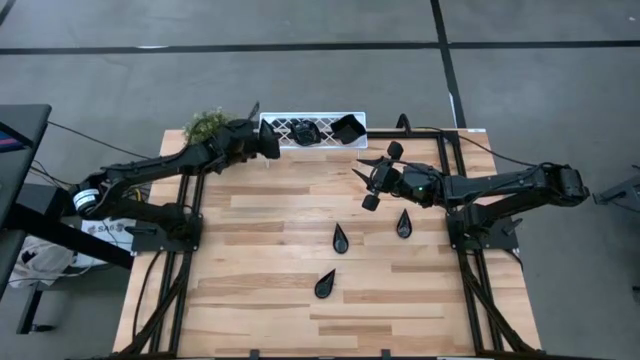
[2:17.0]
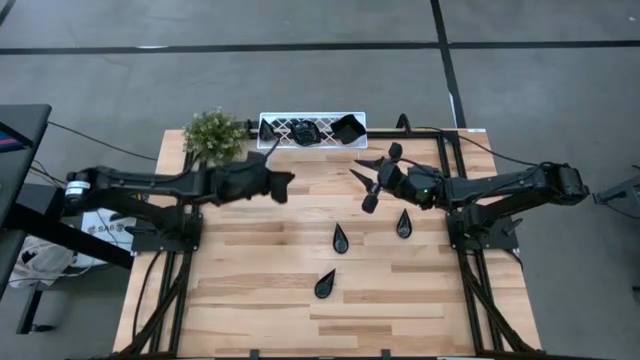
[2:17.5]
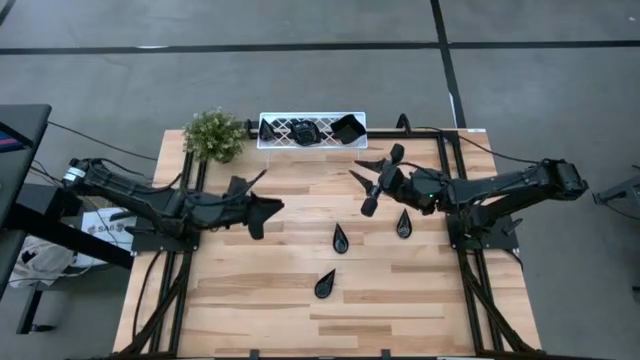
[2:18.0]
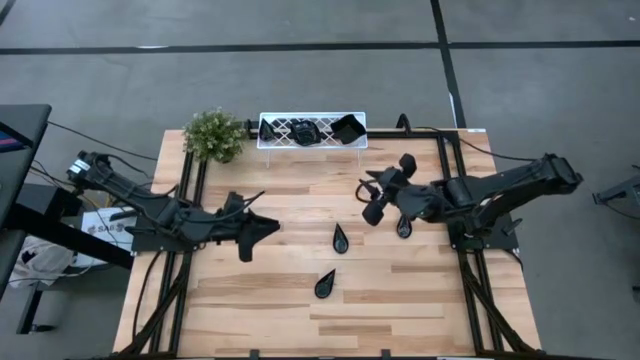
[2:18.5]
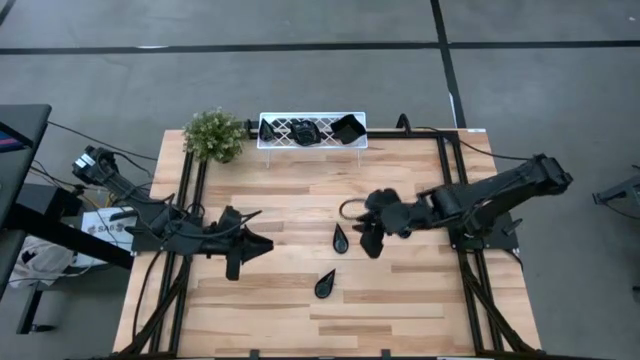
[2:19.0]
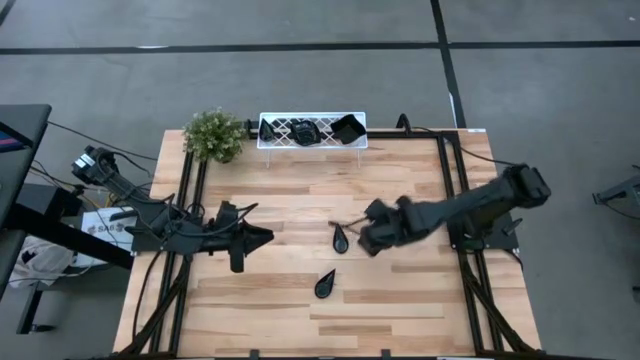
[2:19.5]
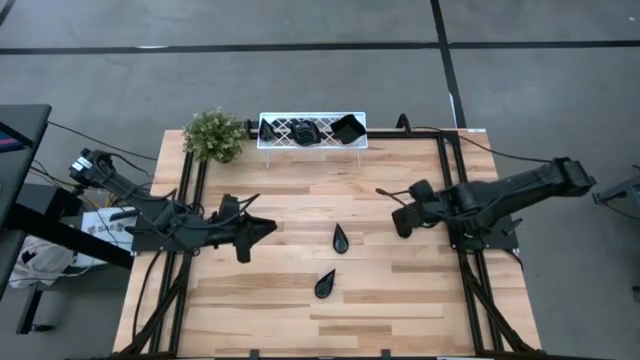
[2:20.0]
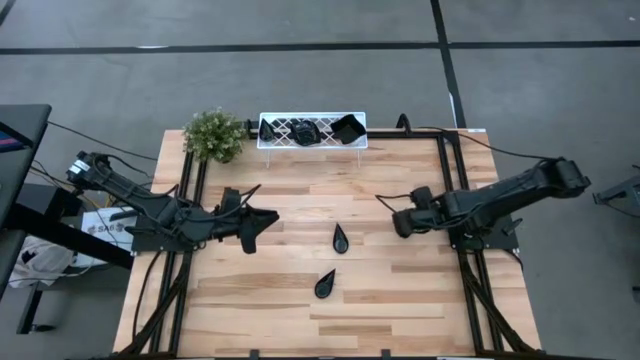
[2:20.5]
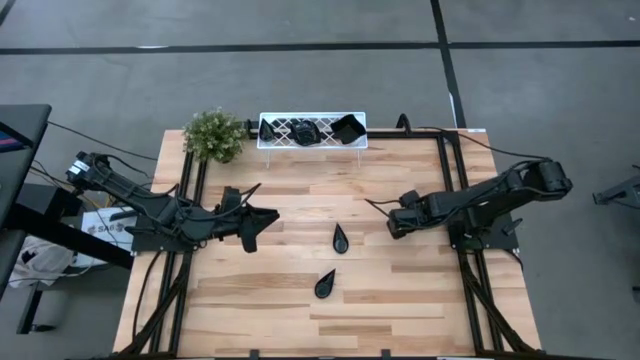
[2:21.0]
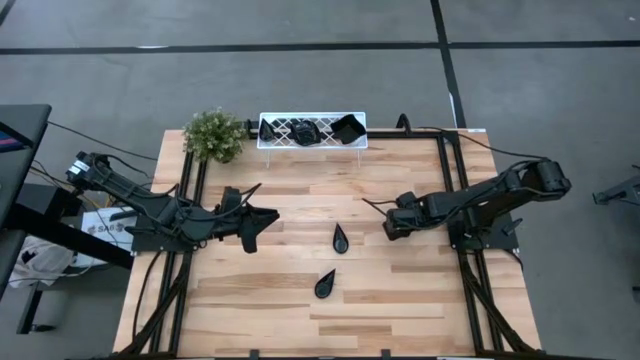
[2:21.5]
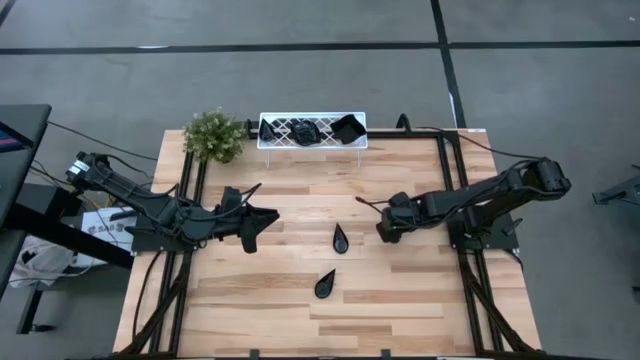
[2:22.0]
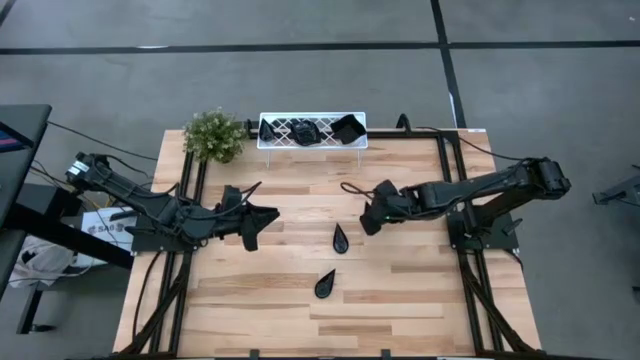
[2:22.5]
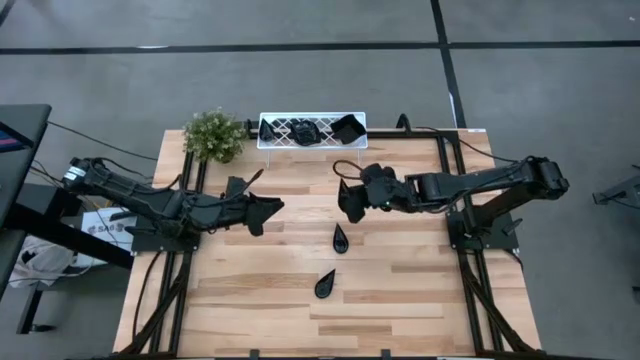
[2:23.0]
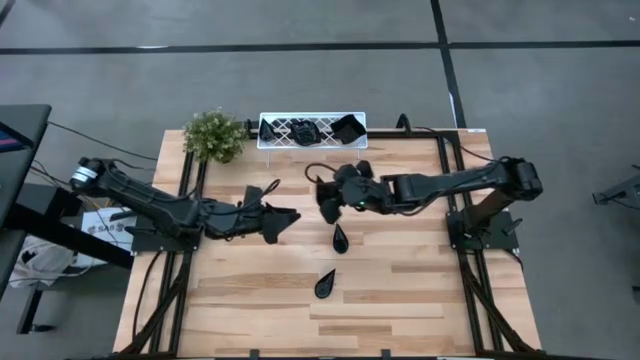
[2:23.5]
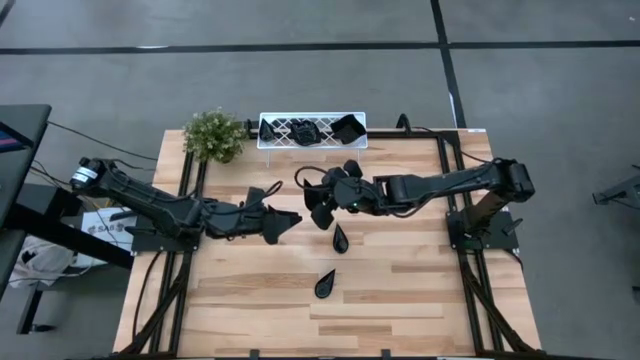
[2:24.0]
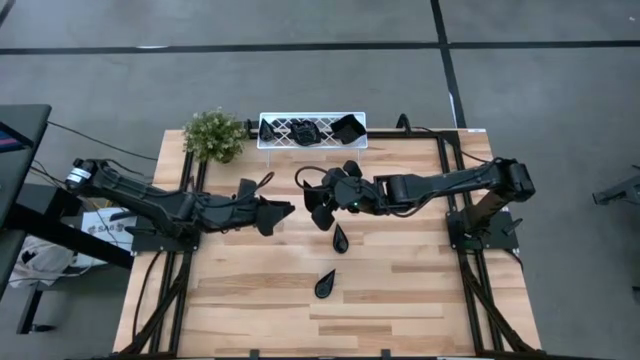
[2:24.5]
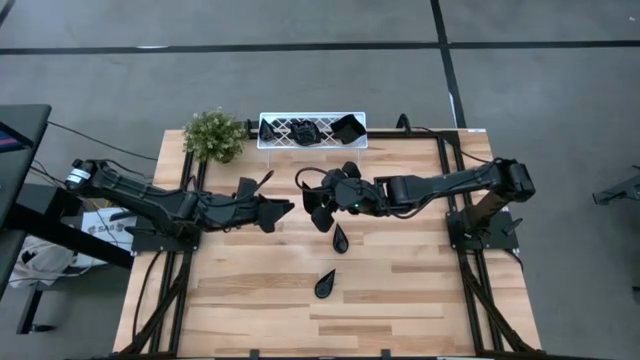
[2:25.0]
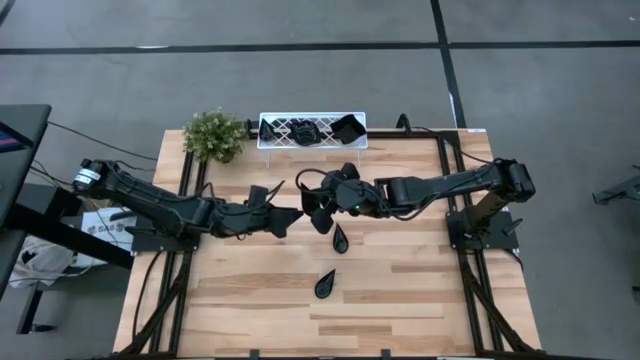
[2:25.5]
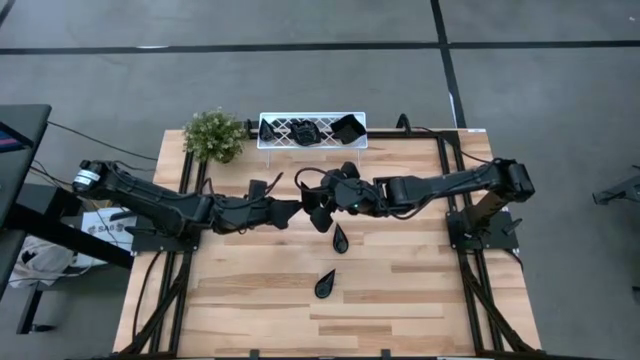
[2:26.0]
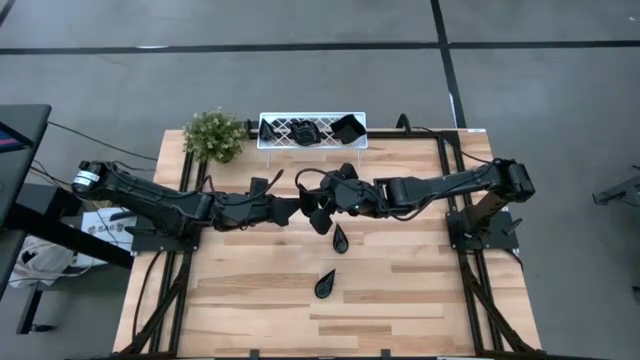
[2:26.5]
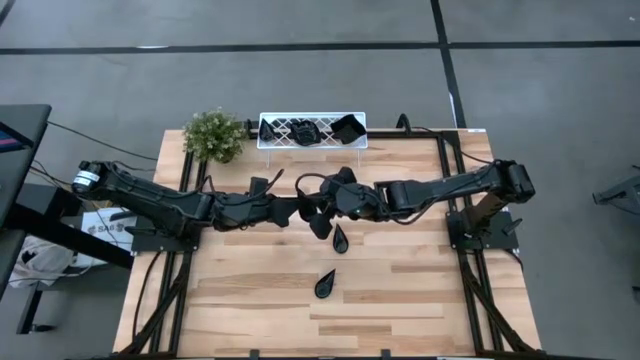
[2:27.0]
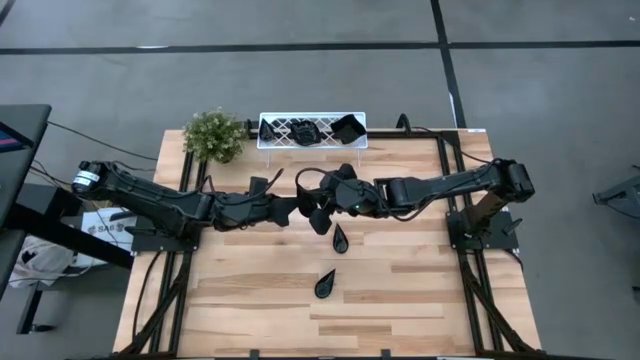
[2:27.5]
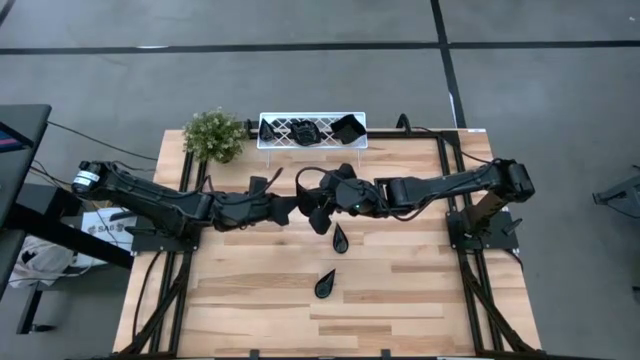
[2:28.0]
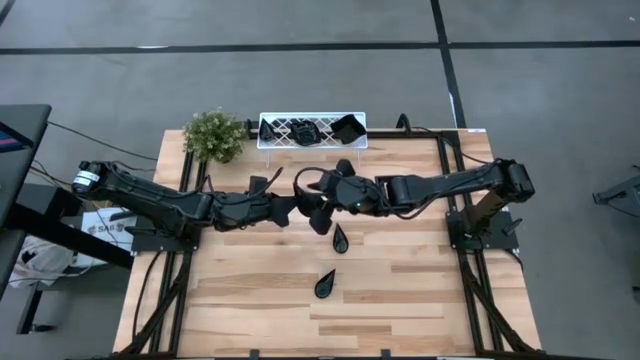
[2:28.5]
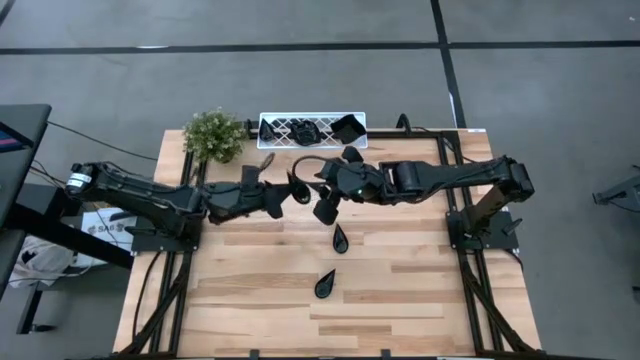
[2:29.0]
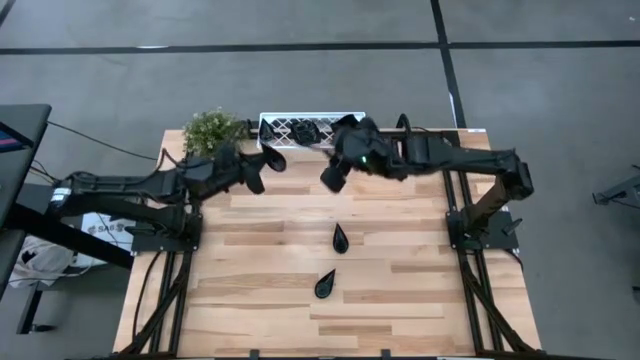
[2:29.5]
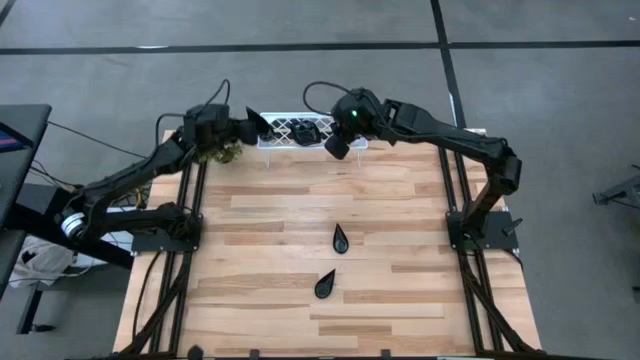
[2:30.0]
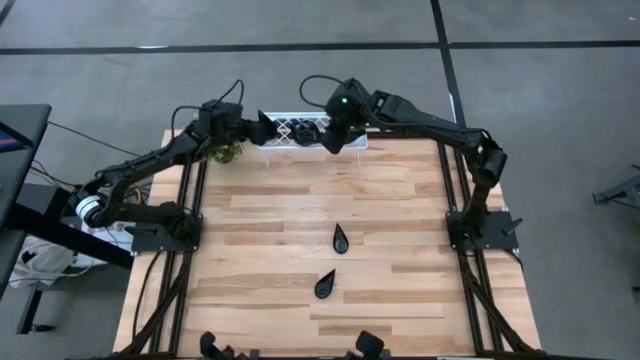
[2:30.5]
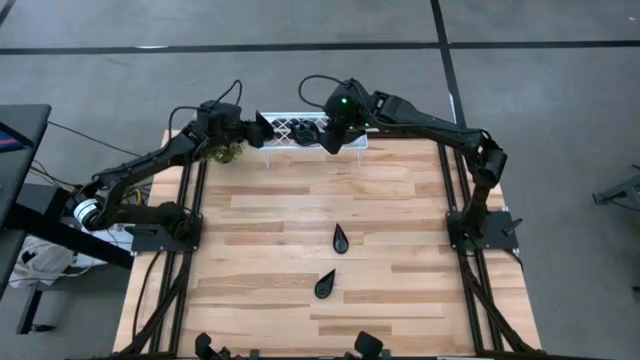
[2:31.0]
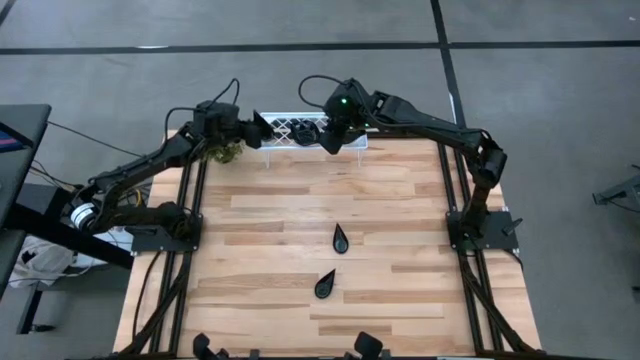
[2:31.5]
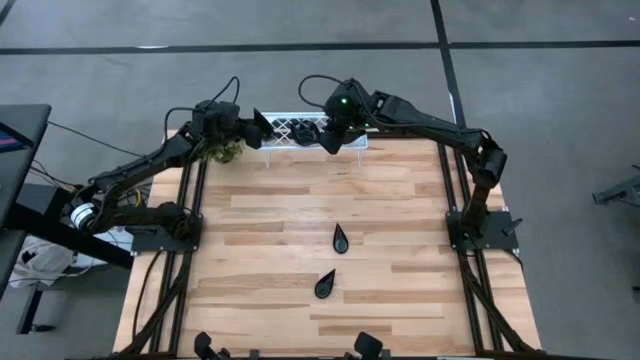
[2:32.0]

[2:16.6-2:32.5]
Task: Pick & Place Mini shaped plates
Stack the right drop shaped plate on the top of the drop shaped plates on the shelf

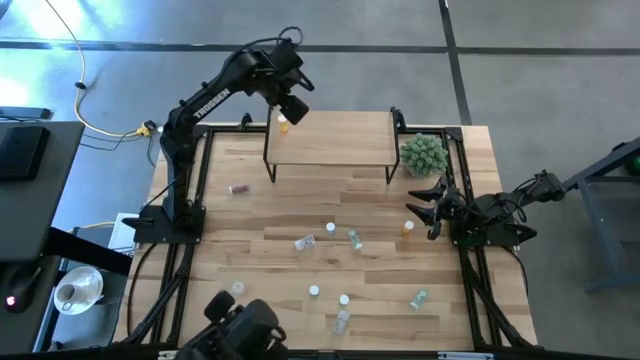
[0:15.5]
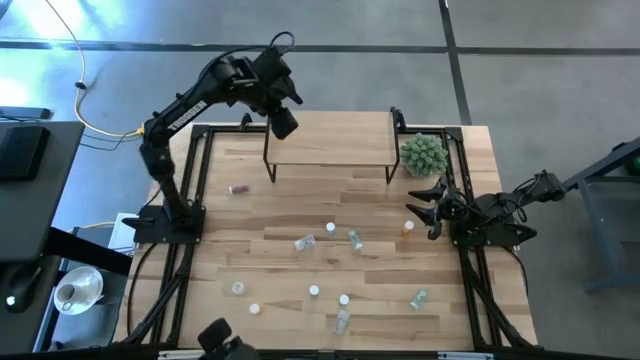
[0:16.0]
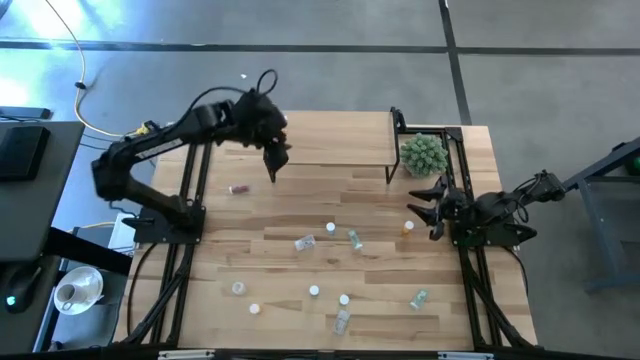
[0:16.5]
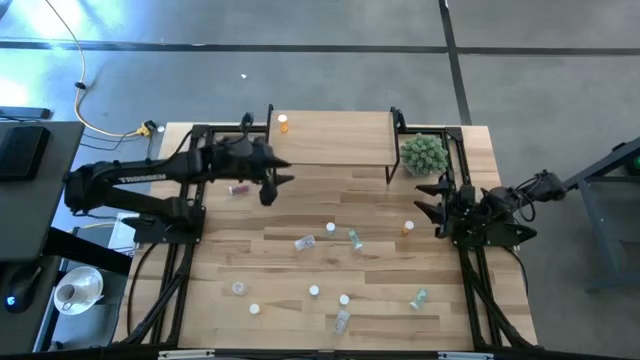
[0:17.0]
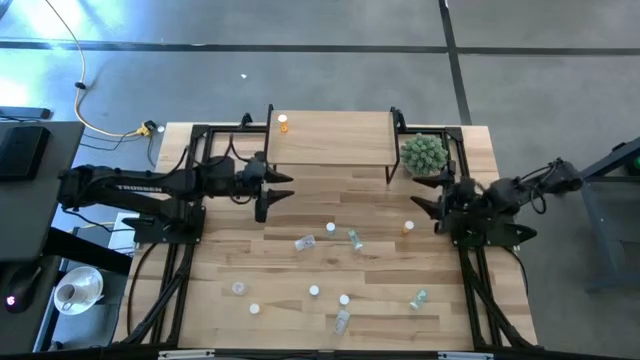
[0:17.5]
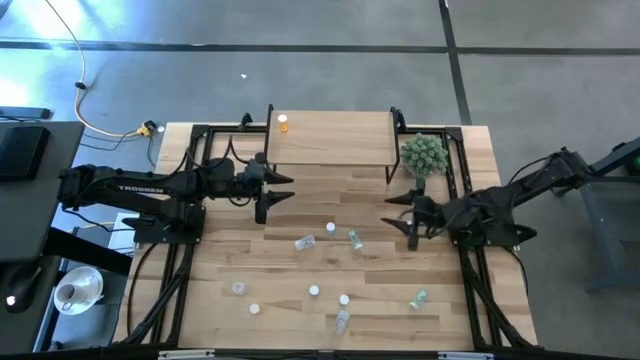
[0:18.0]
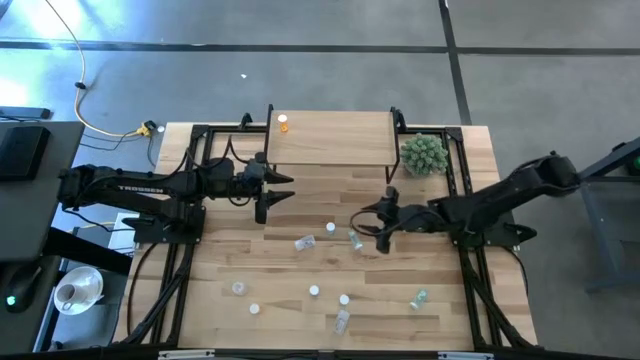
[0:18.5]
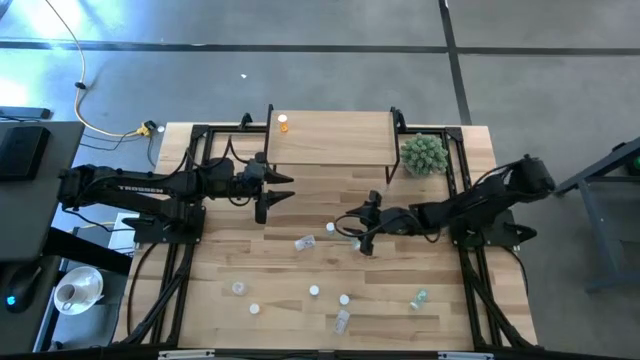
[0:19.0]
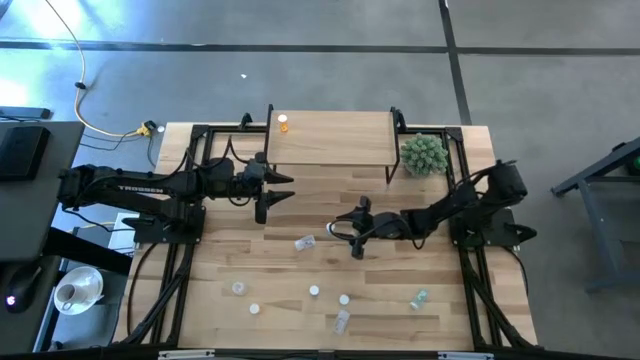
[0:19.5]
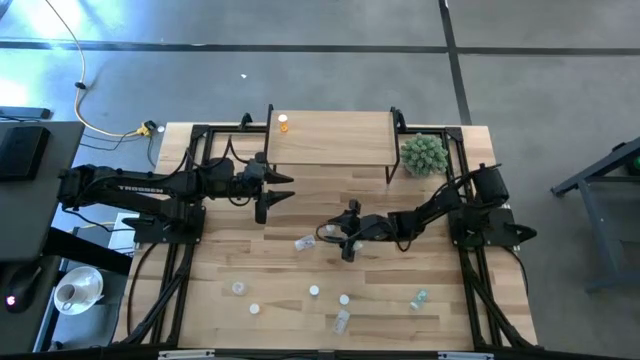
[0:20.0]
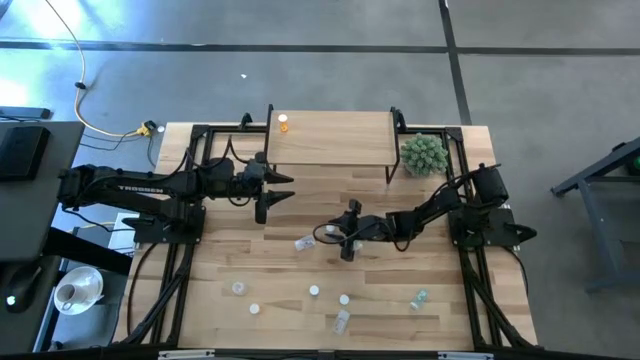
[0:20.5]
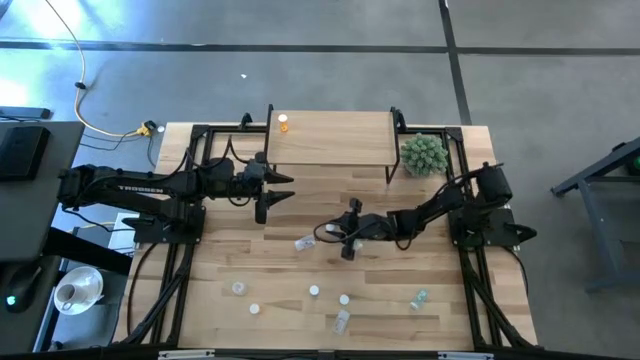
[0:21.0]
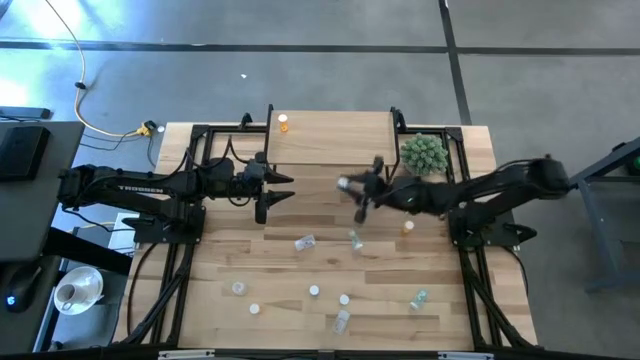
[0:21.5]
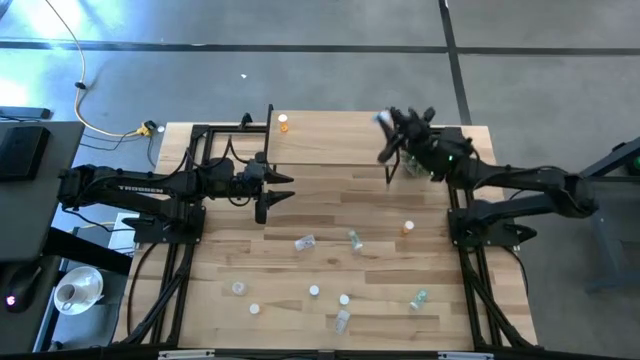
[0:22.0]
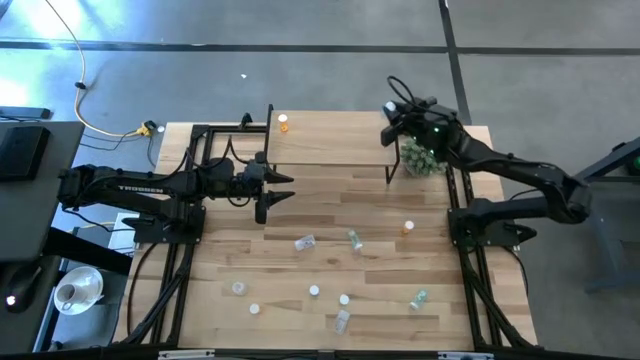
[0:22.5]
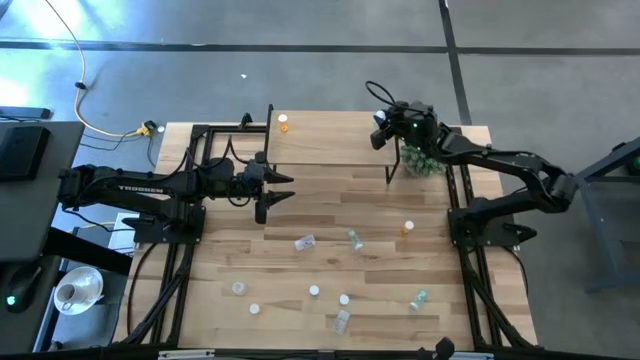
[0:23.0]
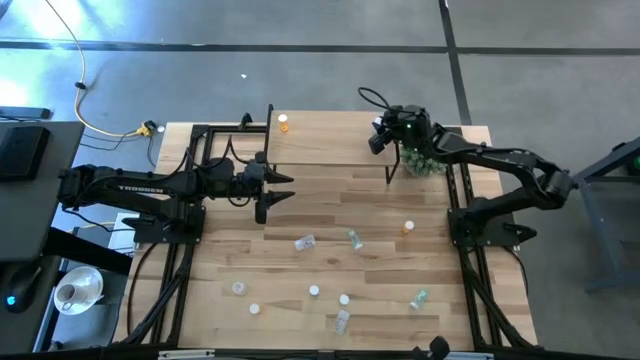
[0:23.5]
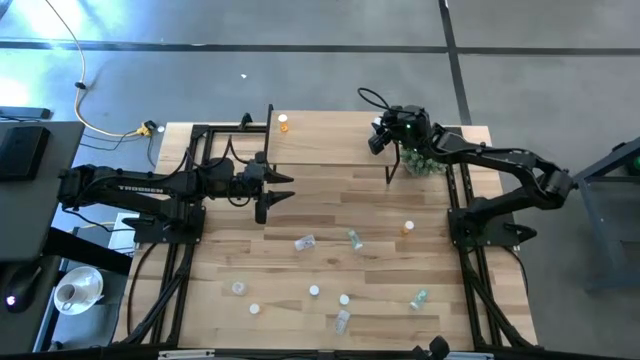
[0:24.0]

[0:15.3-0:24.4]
Task: Pick and place medicine bottles onto shelf by color
Put the top blue pill bottle on the shelf
